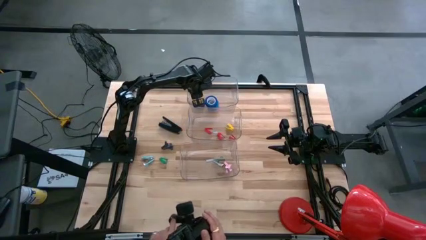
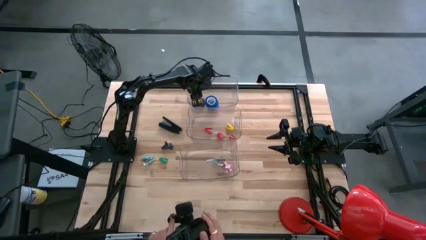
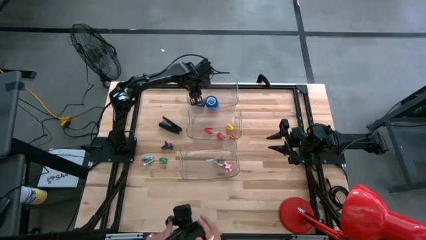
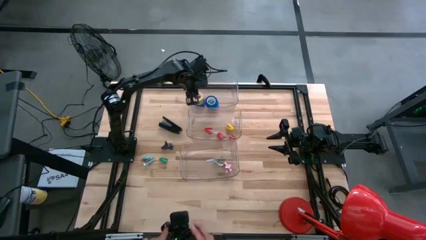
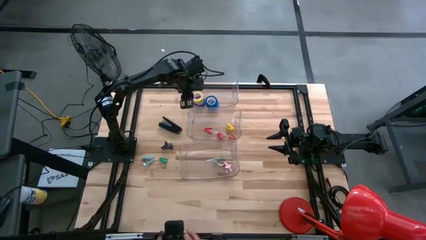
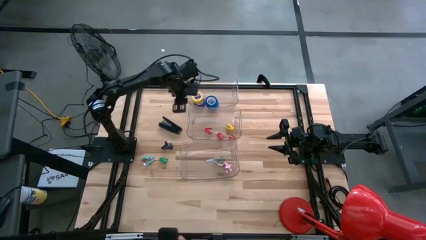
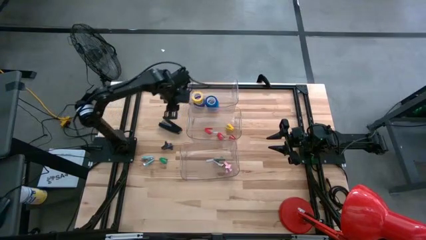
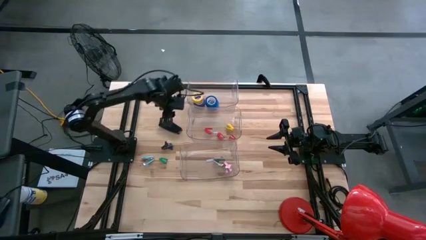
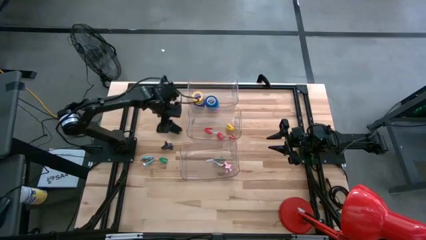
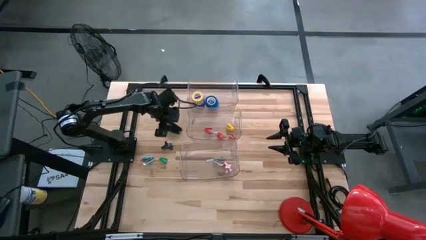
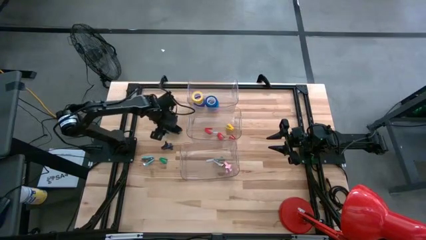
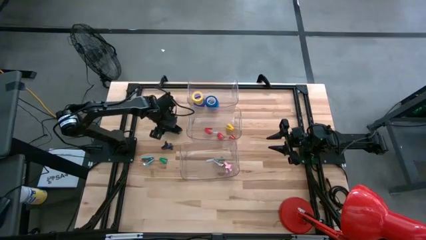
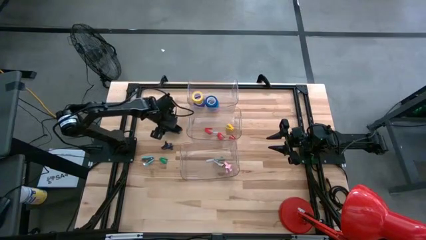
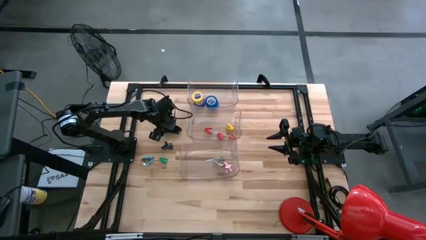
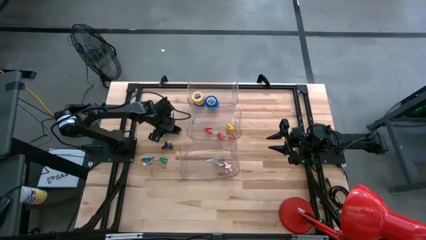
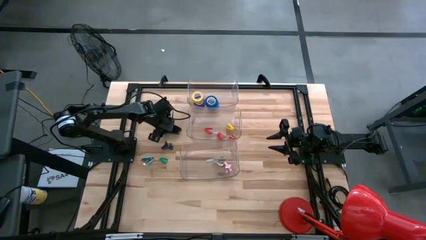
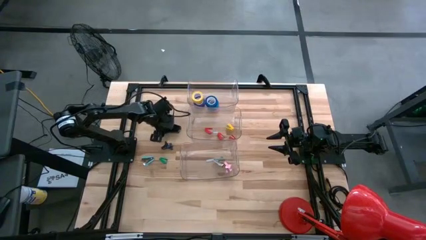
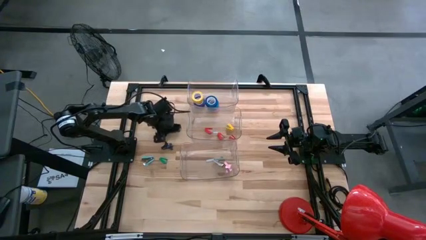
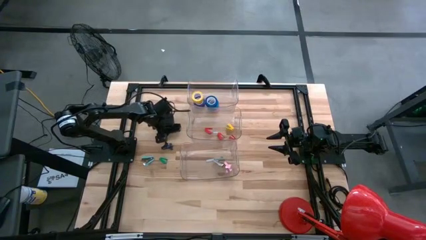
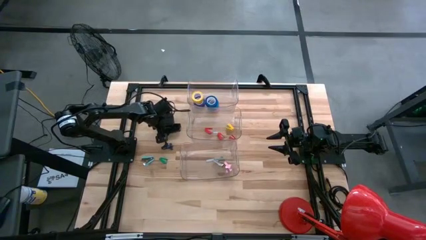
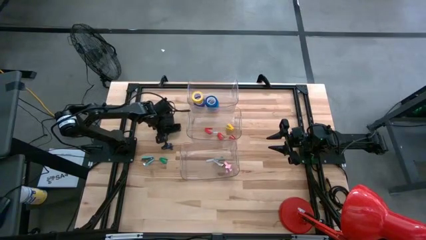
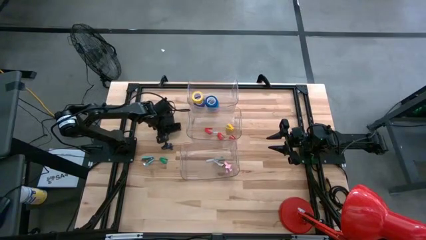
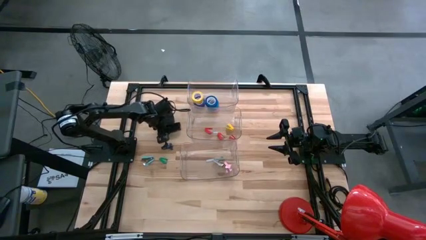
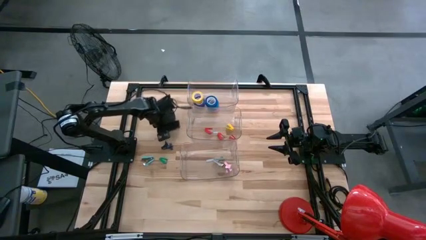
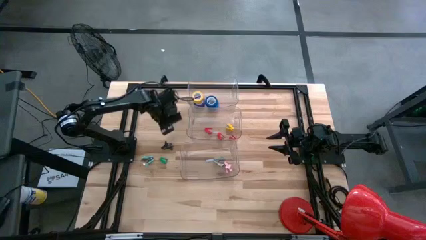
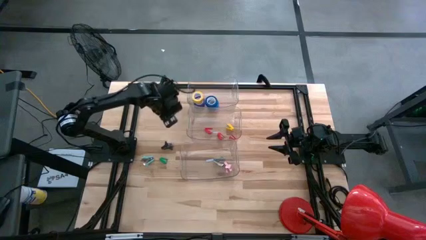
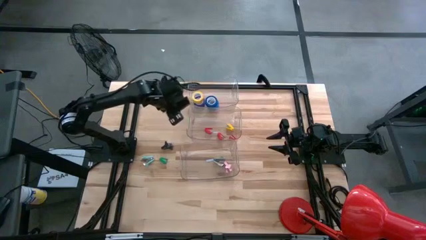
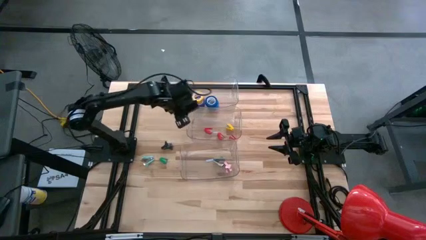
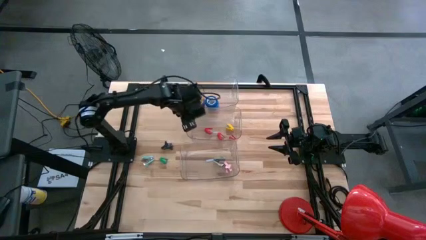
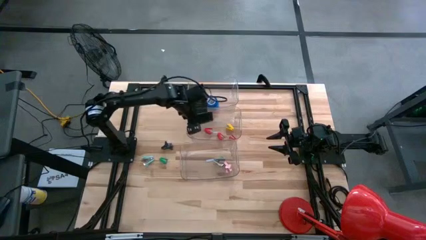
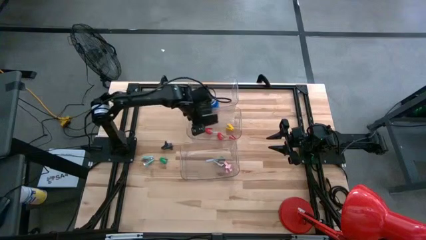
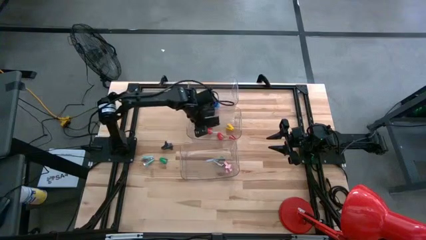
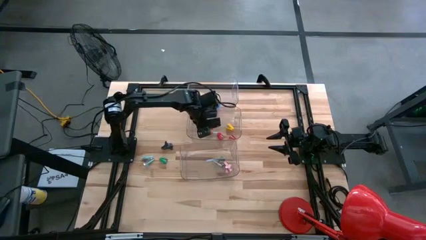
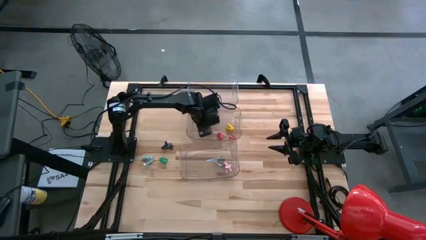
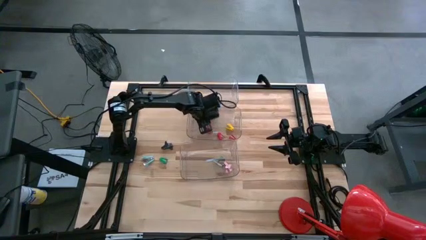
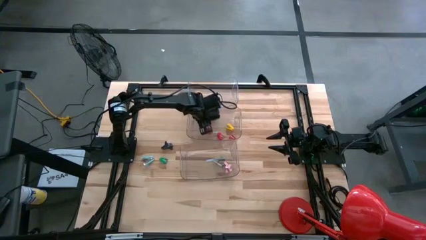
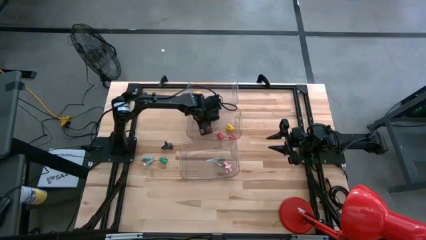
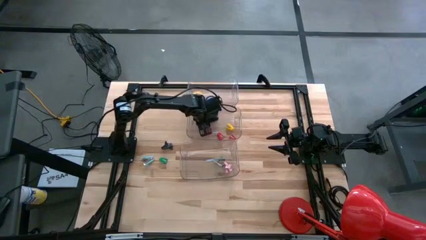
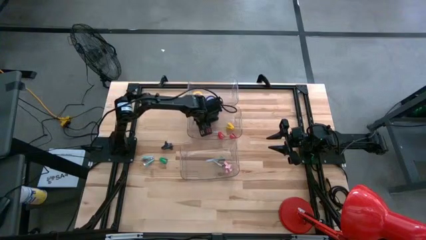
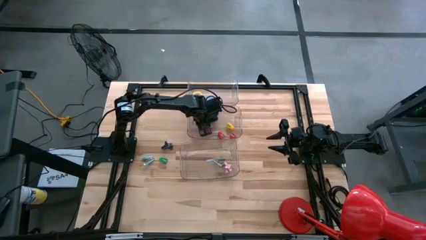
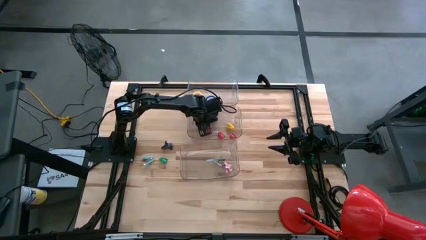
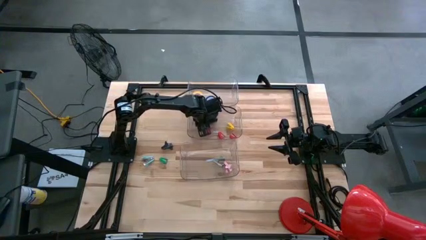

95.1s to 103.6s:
Task: Pick and place Stapler, Stapler remover, tape
Put the black stapler into the middle transparent bin

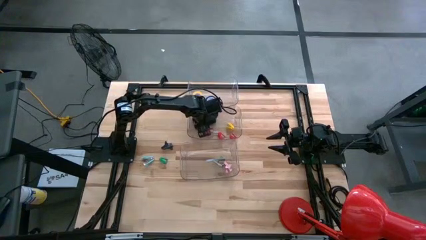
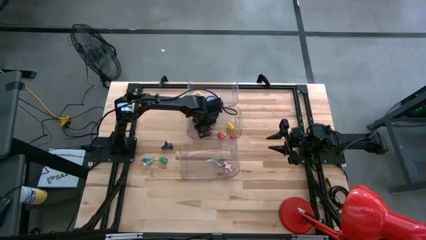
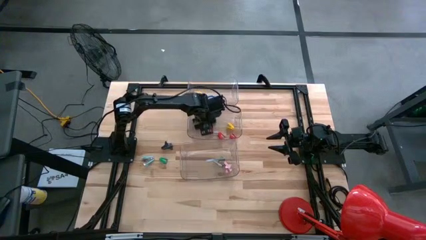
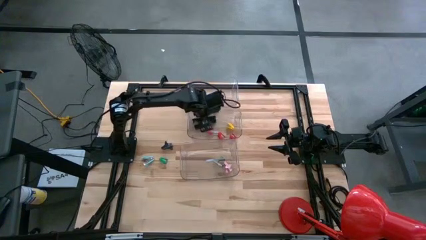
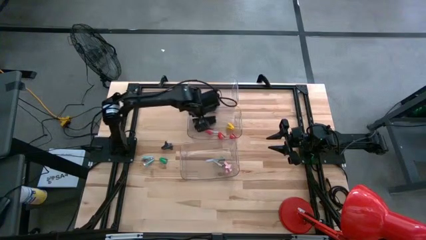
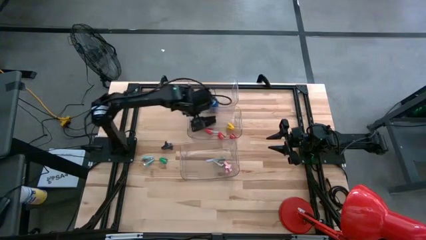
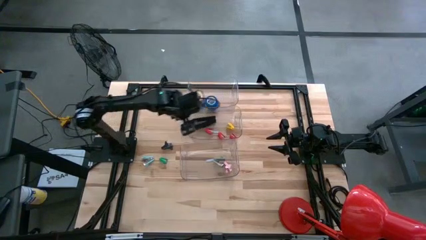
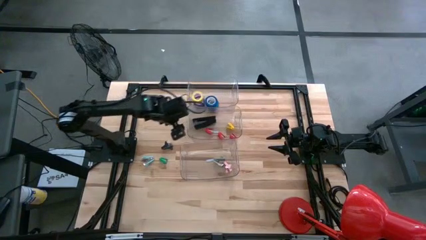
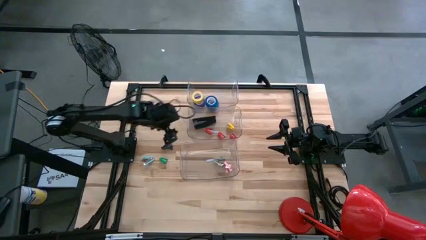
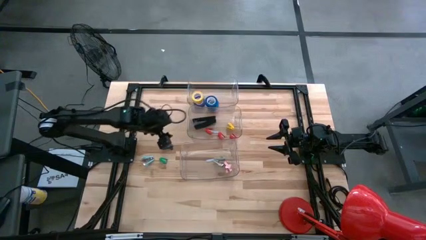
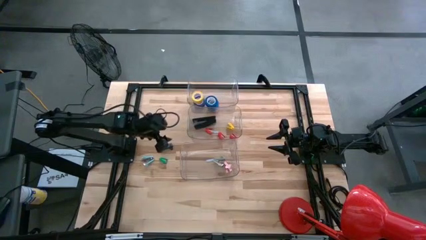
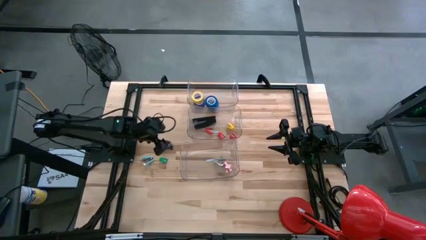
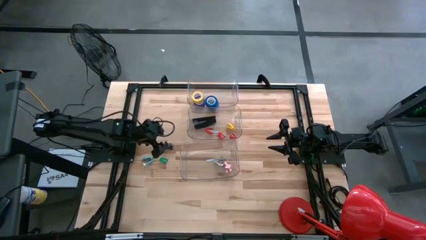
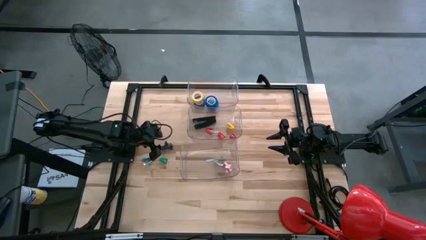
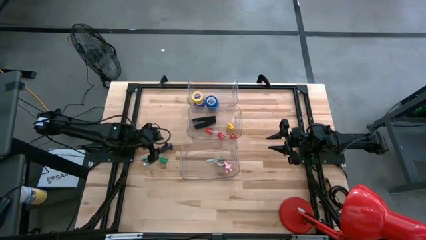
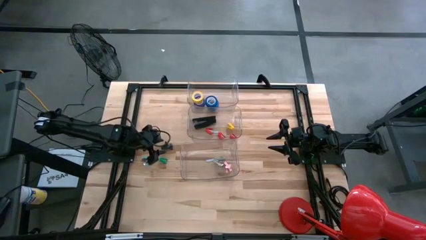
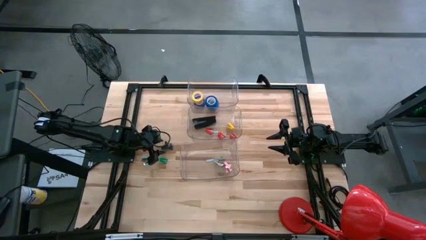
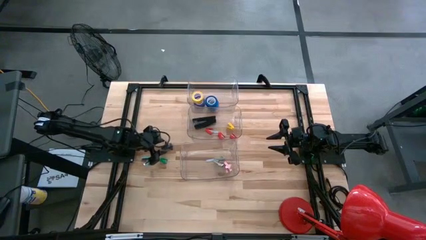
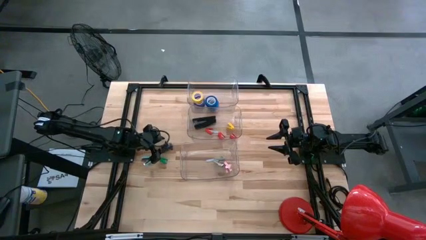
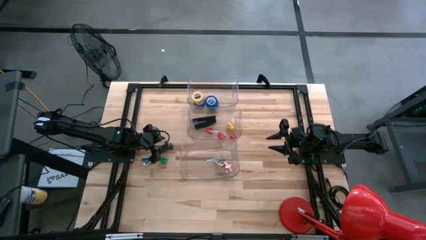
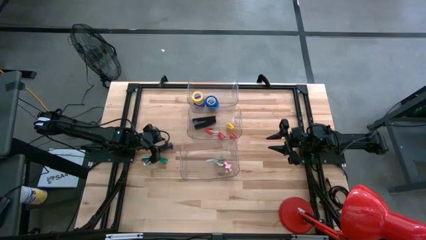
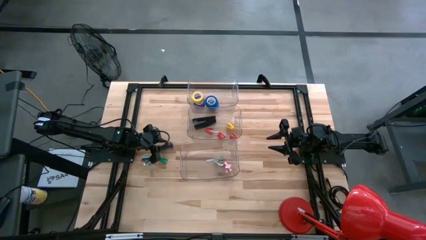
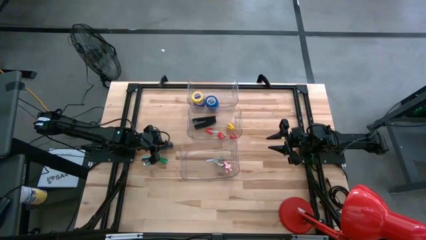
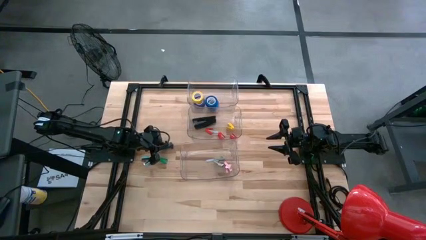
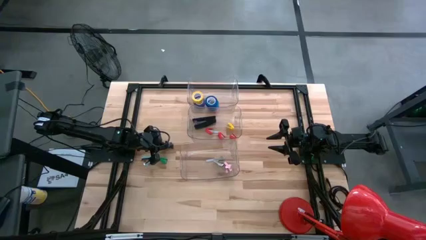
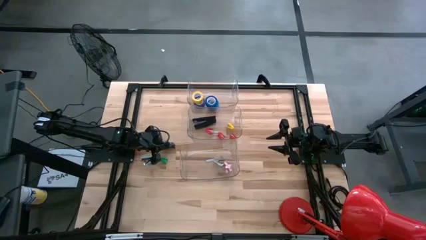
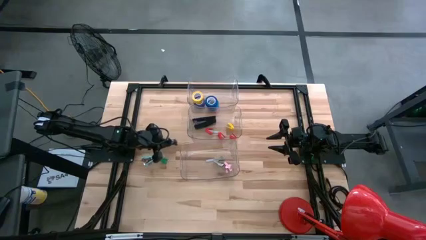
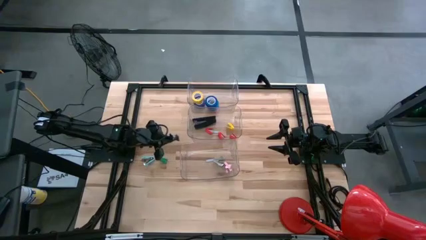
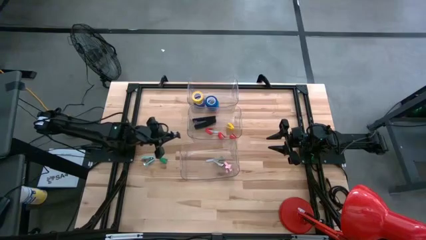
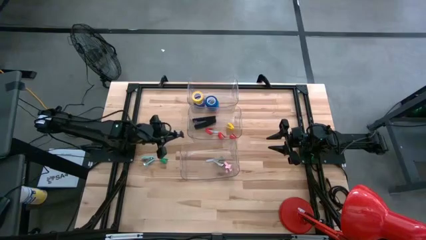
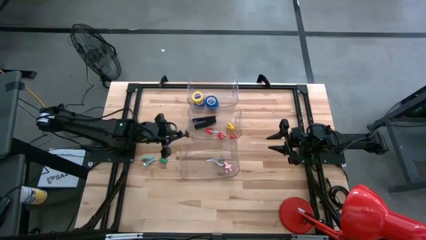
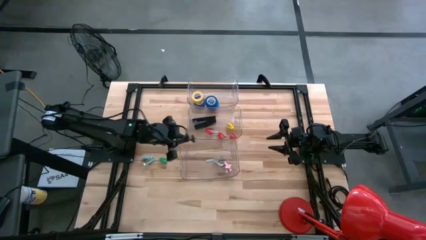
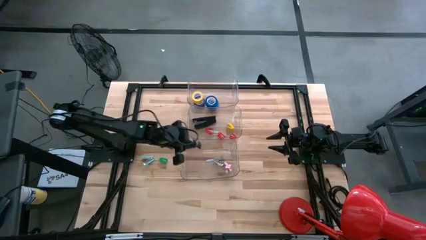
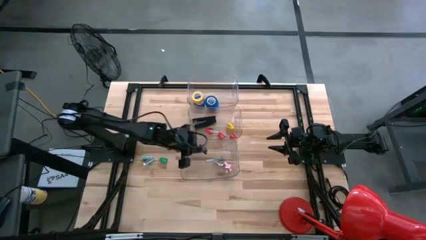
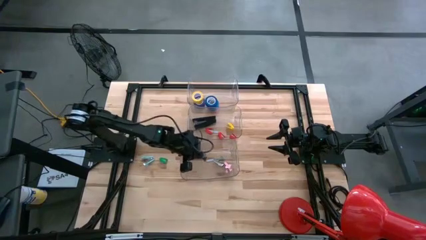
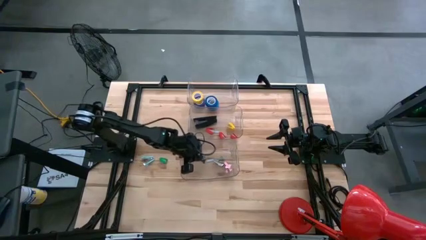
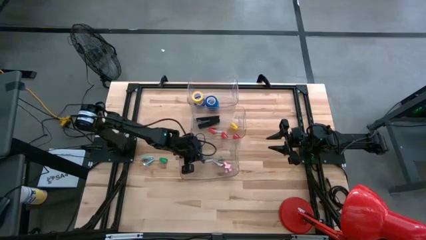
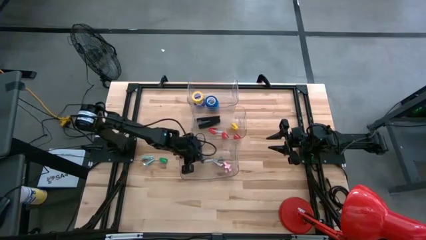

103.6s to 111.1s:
Put the black staple remover into the bottom transparent bin
